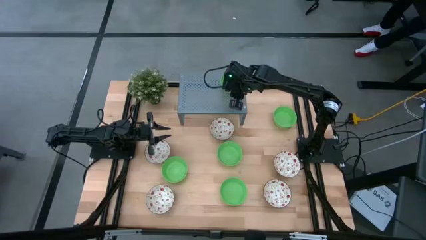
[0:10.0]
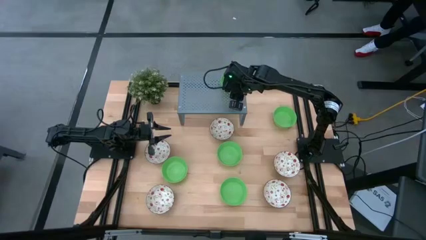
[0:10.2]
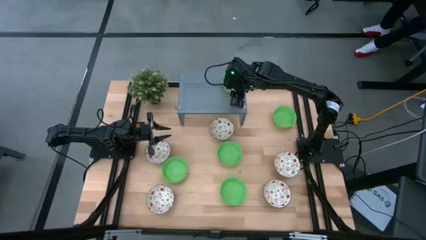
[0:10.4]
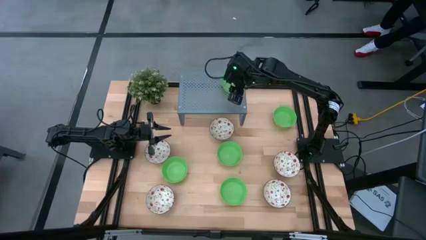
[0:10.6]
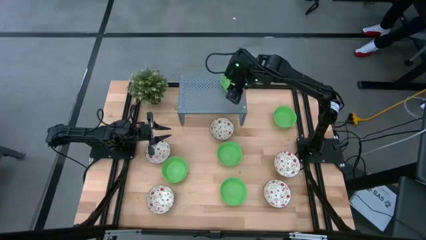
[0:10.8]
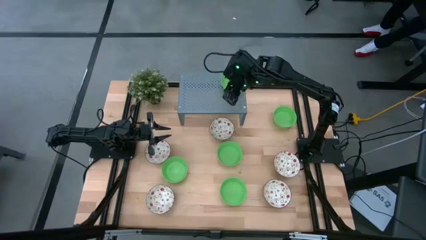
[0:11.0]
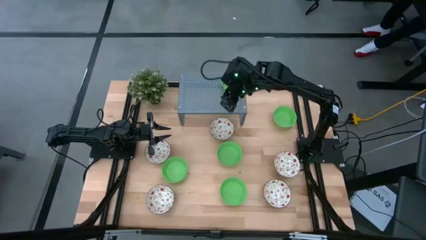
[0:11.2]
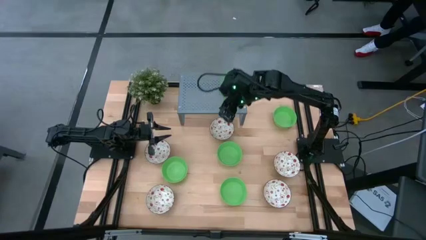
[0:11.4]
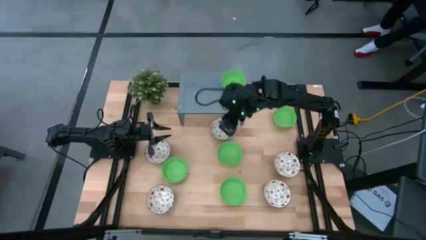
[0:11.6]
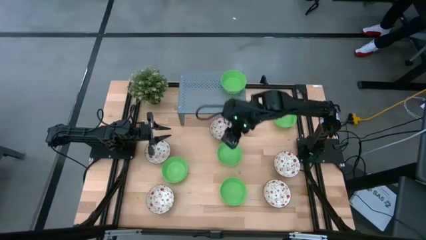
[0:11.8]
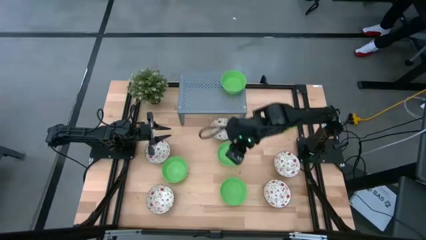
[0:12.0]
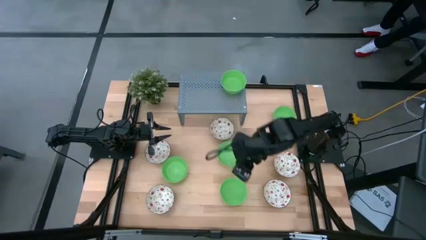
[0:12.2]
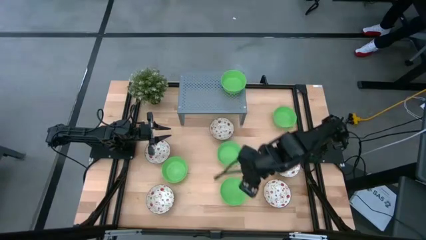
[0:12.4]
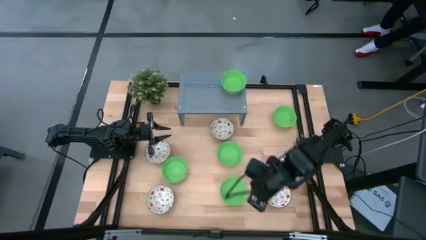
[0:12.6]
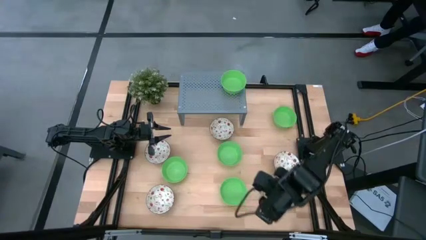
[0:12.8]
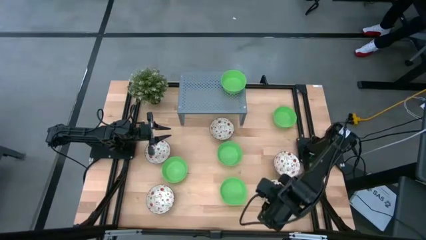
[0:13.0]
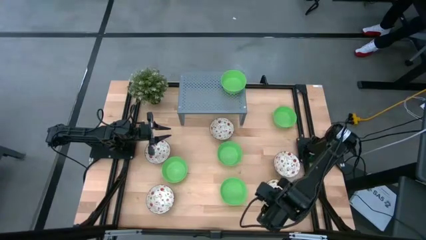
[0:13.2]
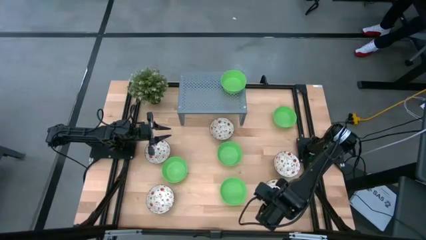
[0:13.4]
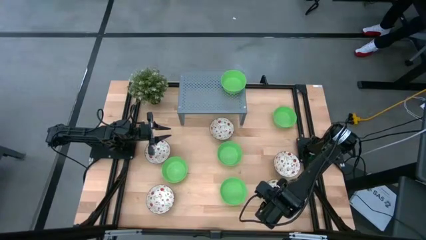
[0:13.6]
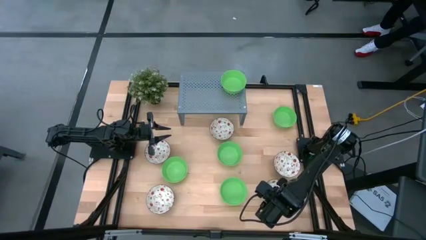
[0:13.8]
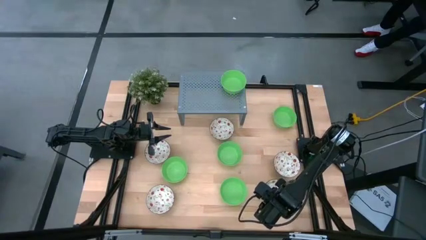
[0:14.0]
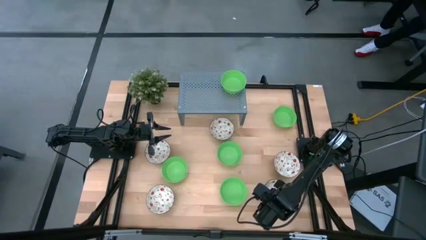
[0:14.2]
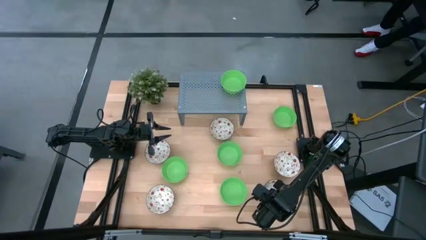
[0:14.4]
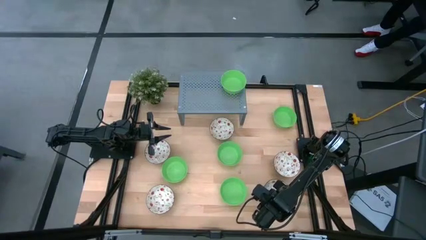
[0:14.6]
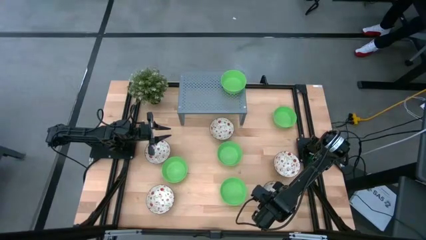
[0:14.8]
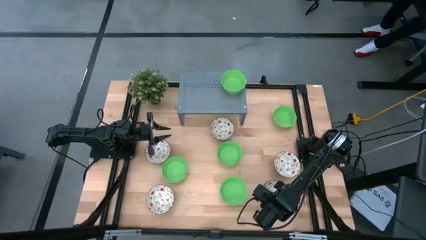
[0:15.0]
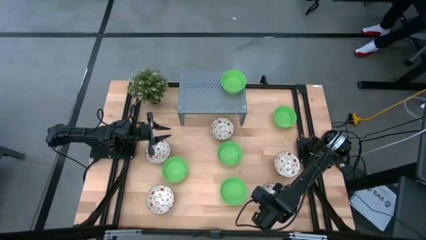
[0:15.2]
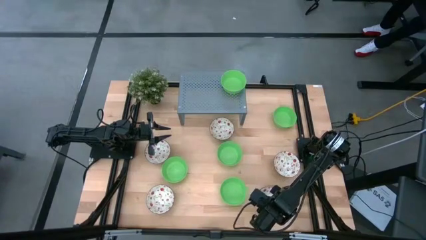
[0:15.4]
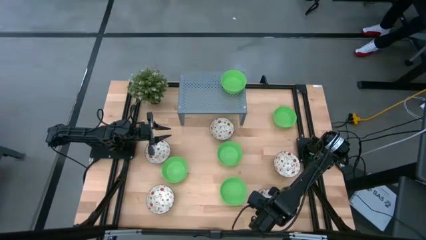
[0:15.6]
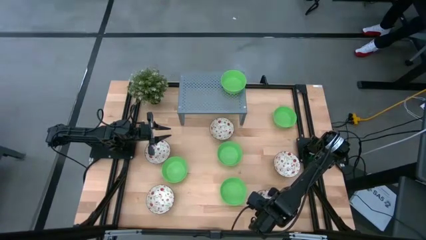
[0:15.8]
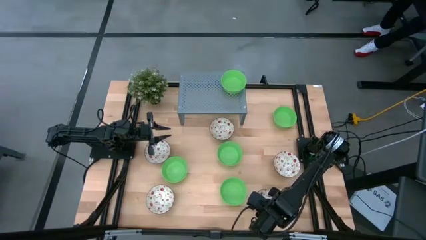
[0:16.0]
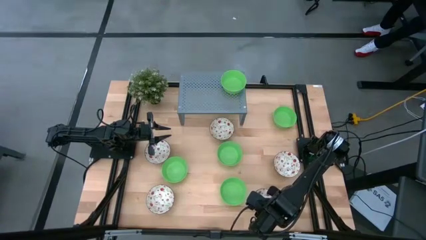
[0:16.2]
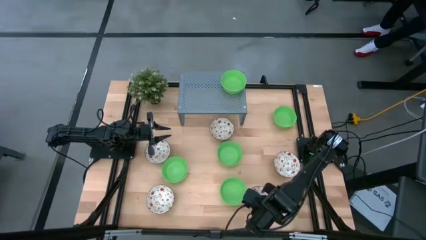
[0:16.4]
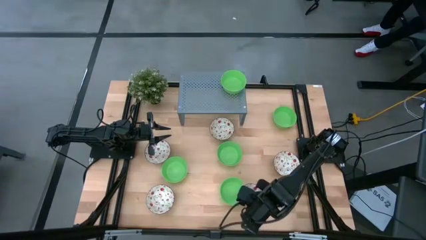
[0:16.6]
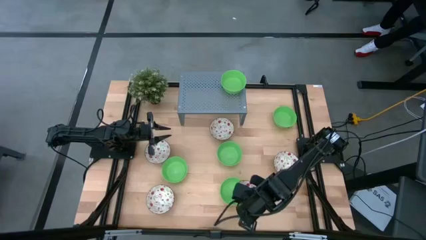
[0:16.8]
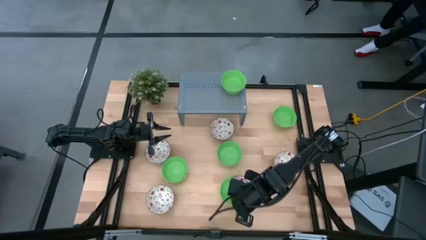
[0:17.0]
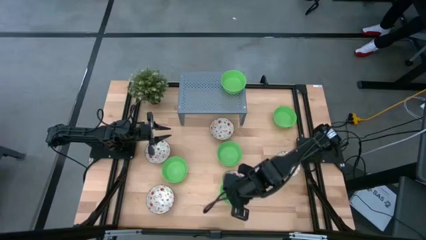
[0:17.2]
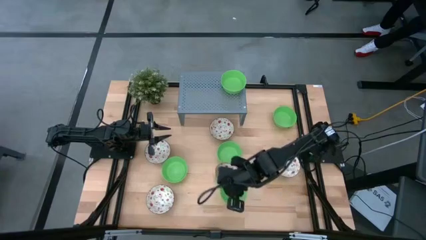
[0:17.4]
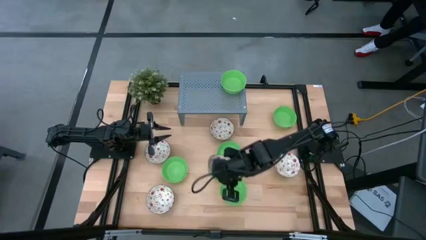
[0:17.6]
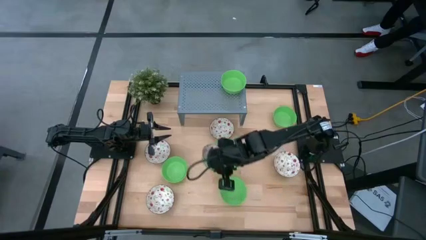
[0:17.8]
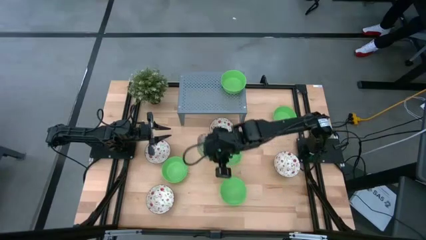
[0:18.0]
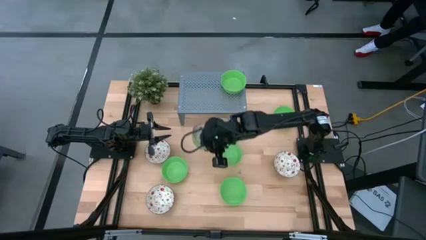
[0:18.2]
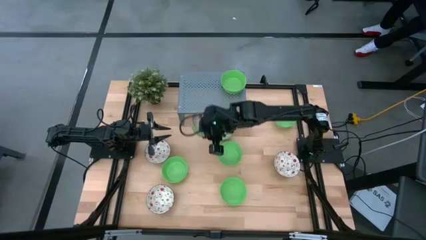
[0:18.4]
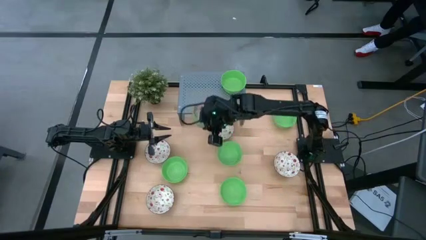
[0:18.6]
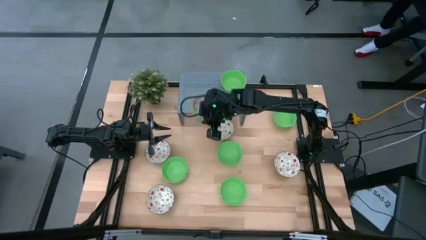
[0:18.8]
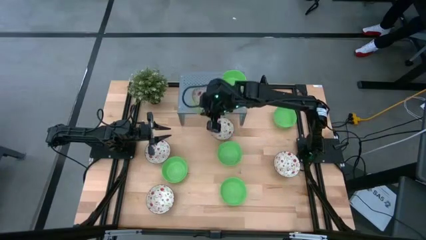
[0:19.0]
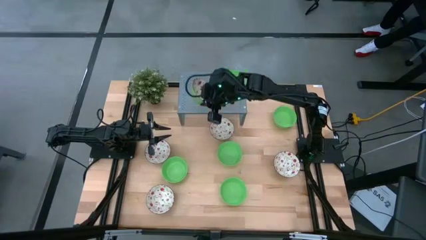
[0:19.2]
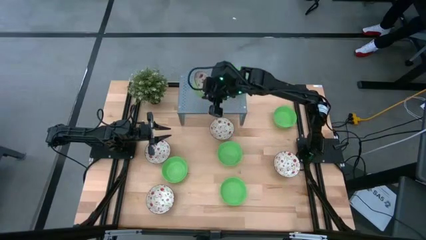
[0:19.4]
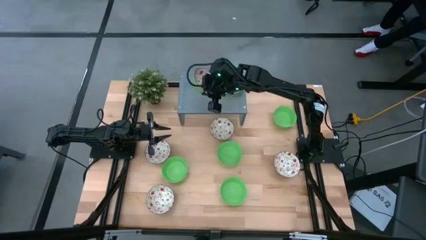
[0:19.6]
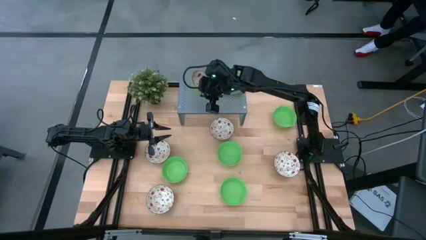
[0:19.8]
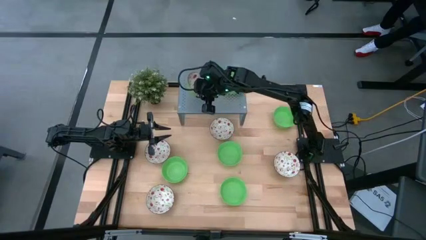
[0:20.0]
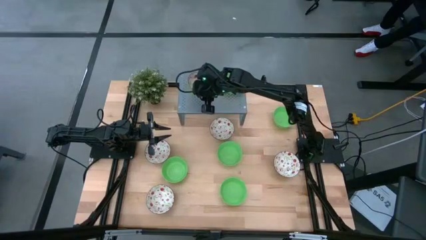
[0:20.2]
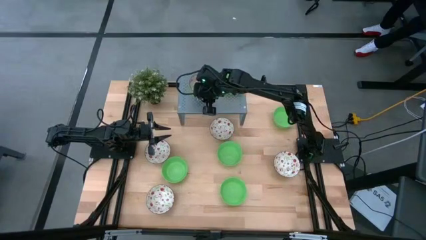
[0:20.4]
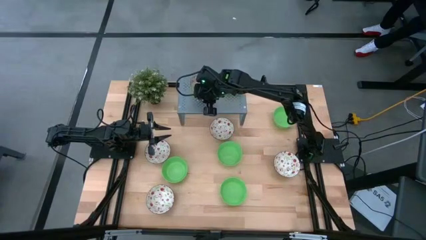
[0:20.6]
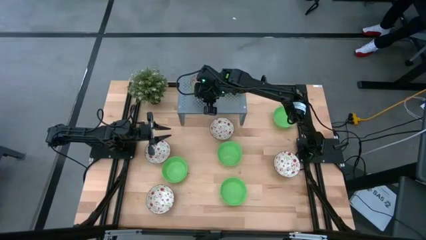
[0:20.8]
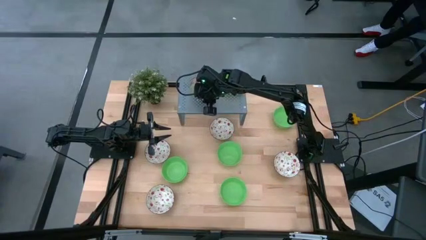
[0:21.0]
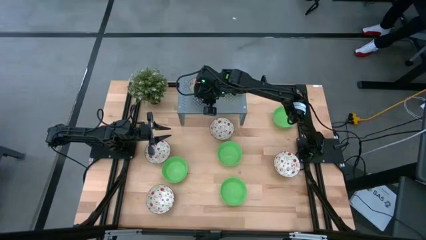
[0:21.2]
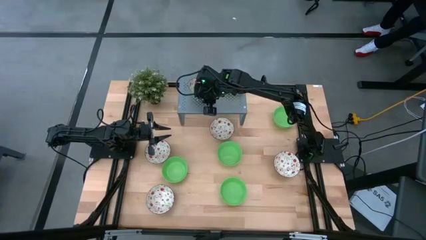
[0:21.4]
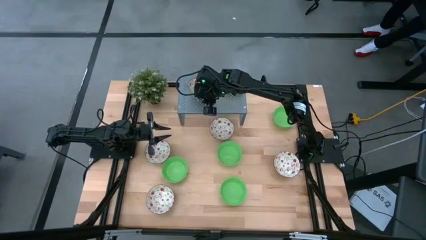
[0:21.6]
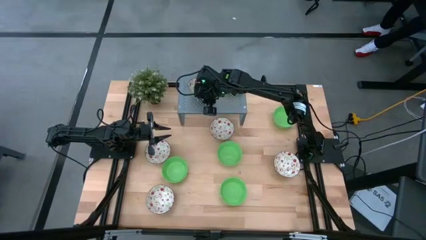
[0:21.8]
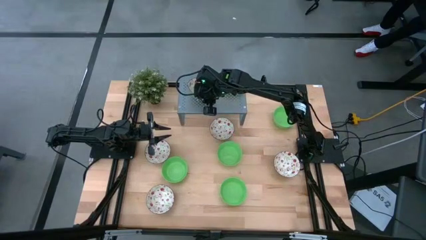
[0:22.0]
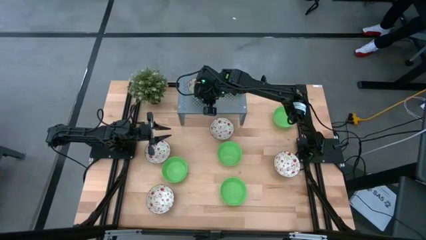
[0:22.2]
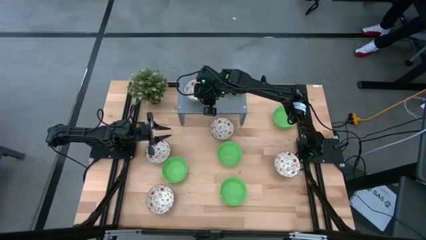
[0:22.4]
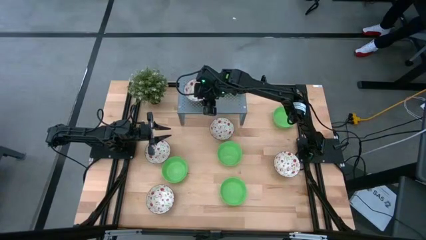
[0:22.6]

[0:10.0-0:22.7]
Task: Pick & Place Mini bowls
Put the green patterned bowl on the shelf
